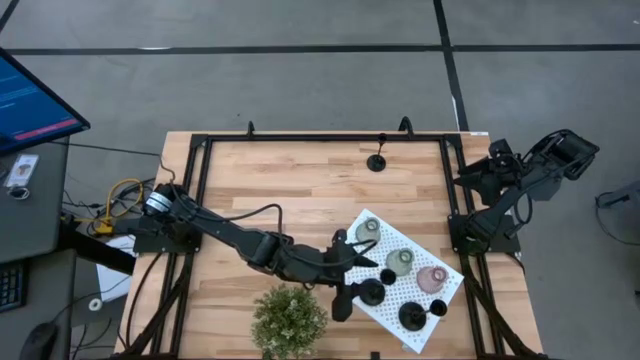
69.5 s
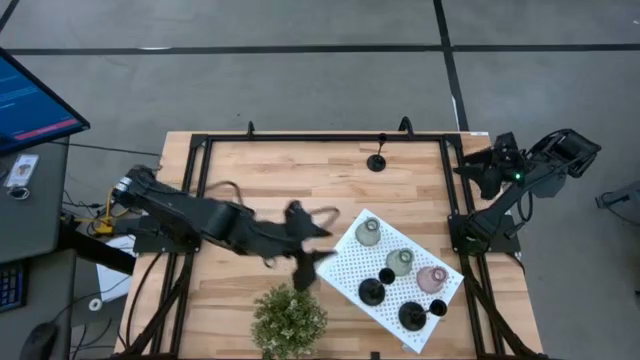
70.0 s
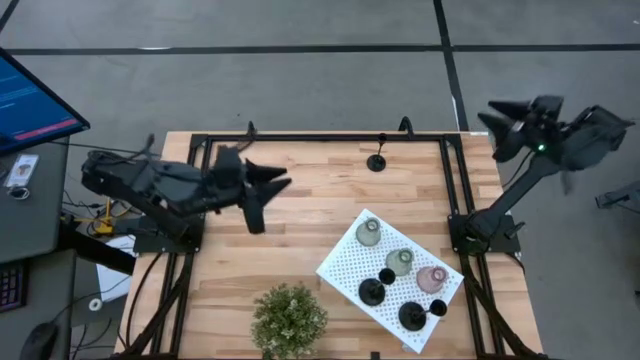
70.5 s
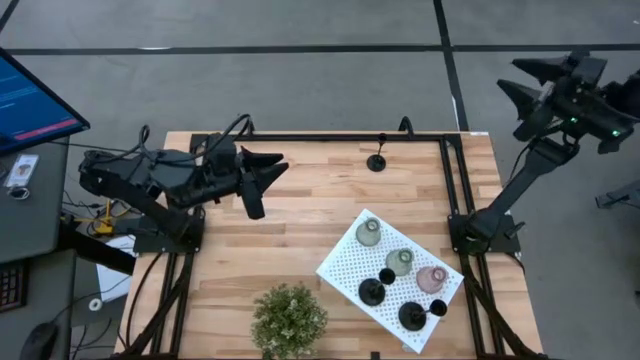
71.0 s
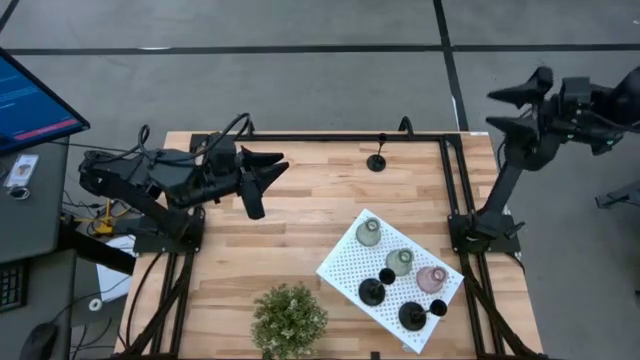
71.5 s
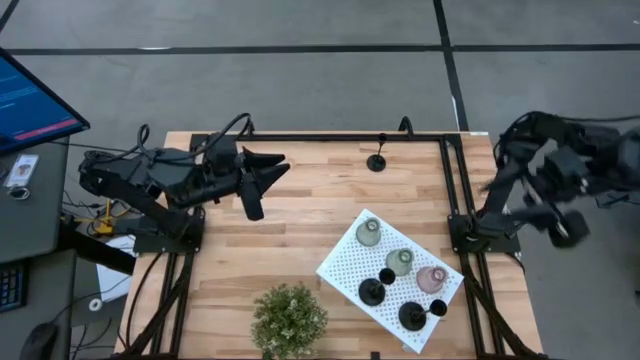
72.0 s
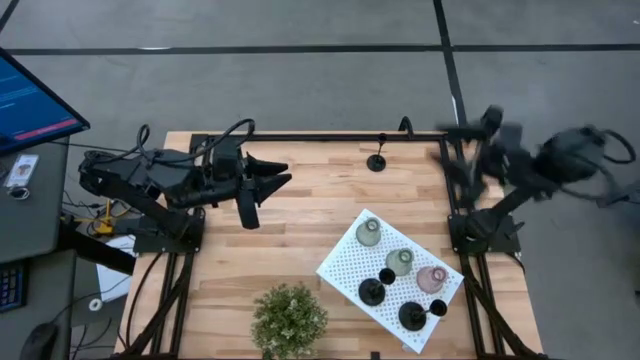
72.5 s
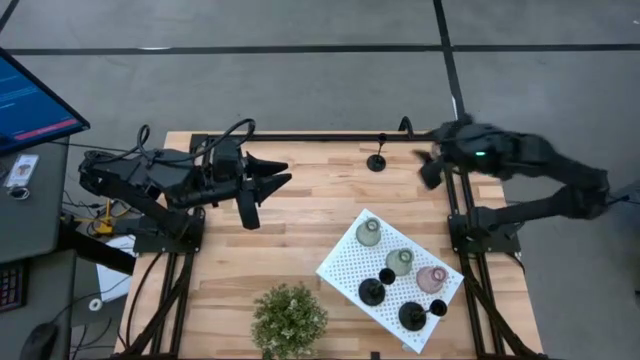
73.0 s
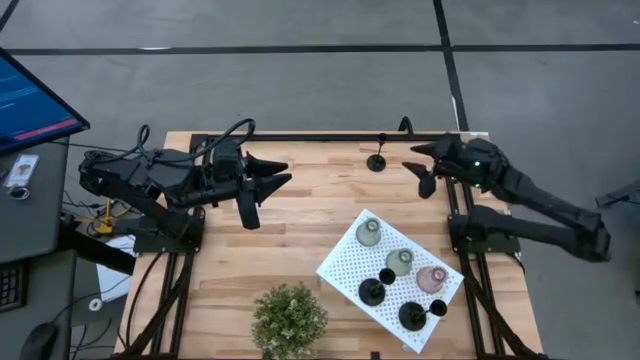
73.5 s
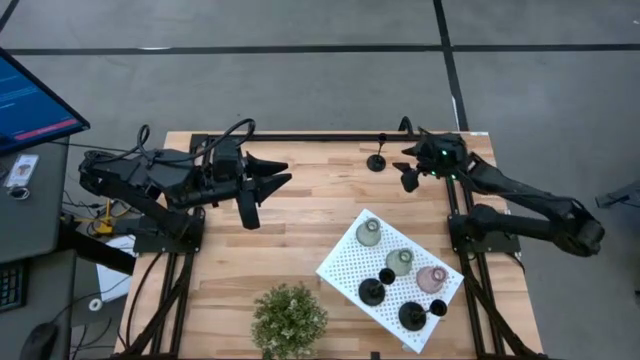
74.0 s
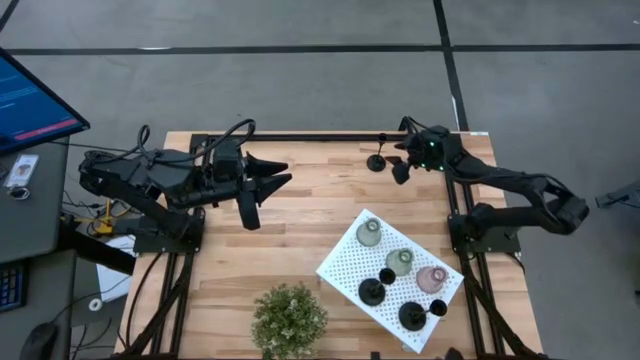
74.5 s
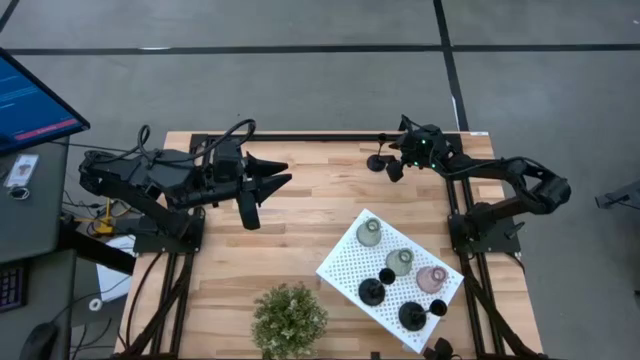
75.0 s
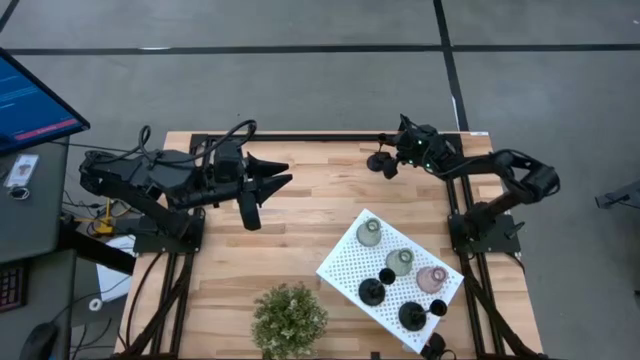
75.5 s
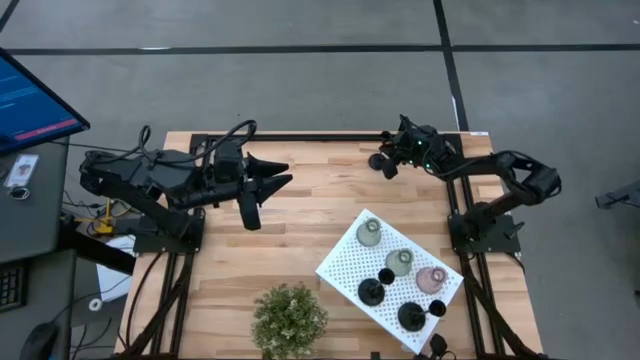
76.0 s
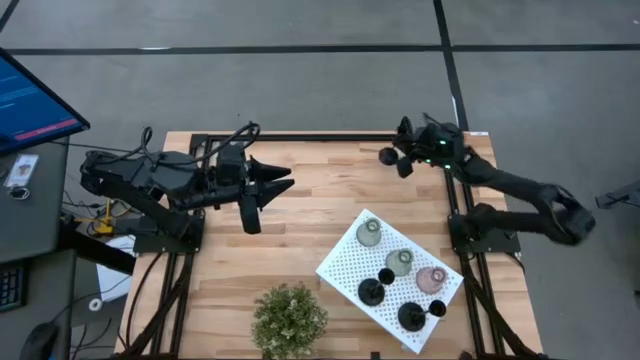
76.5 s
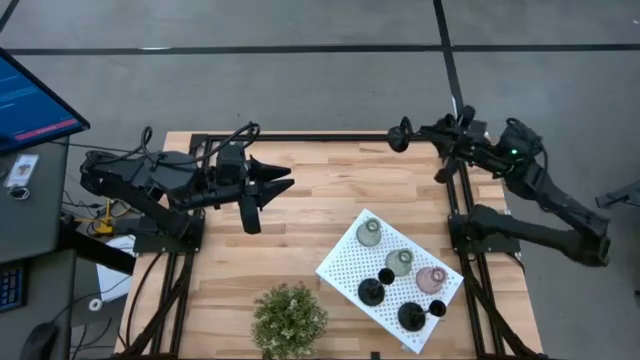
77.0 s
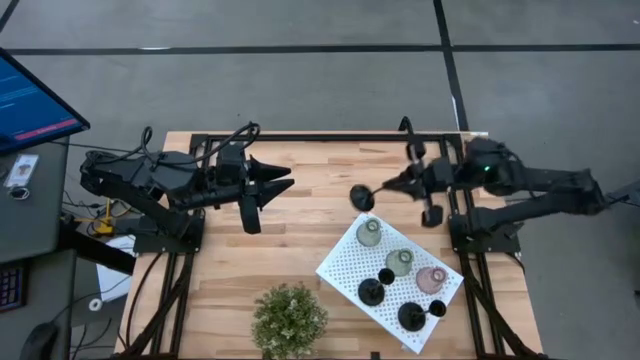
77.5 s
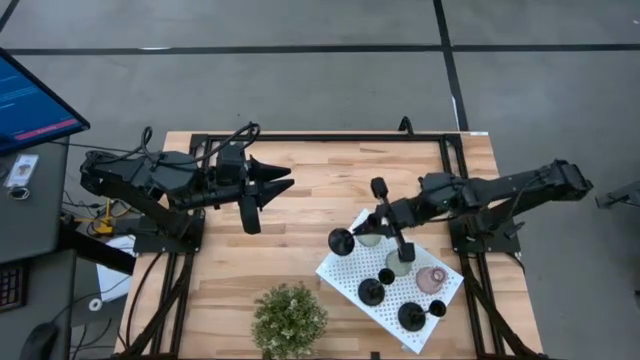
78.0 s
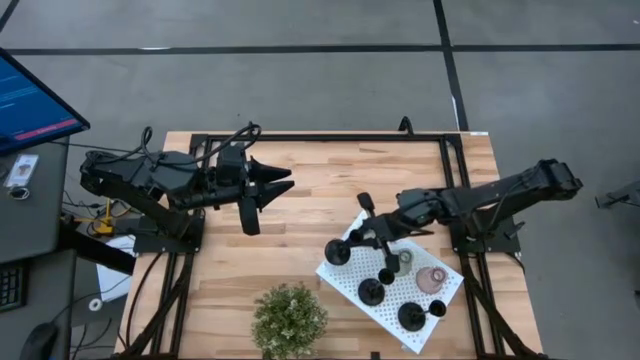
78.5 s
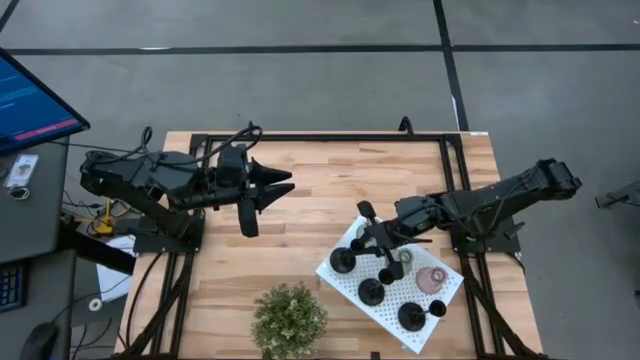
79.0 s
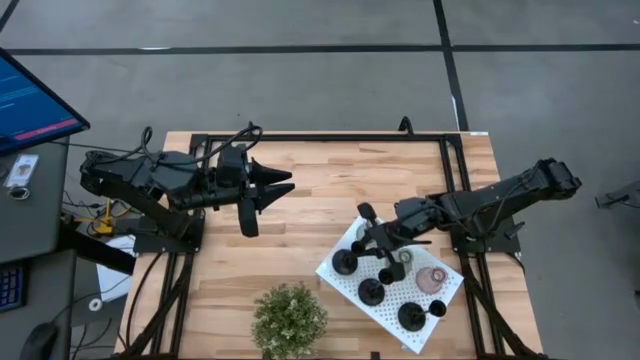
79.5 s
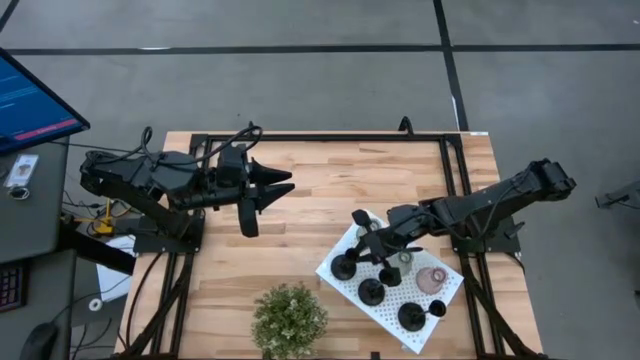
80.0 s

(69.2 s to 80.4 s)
Task: Pick & Place candle stick holders
Put the left black candle holder on the shelf aligned with the black candle holders

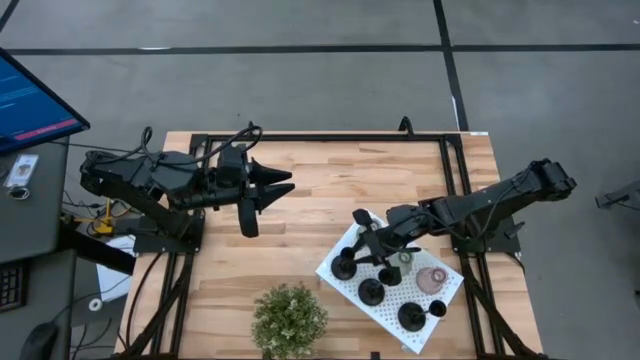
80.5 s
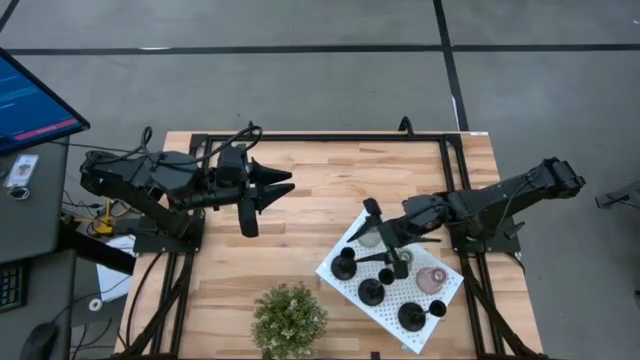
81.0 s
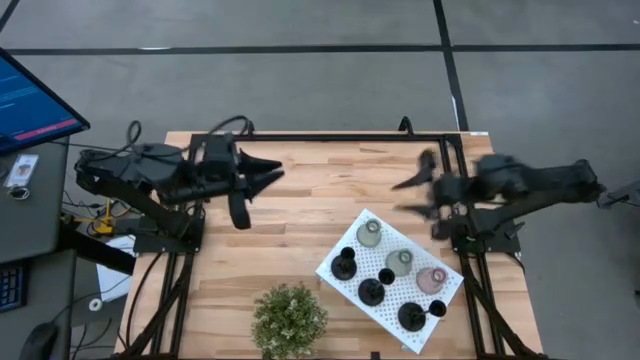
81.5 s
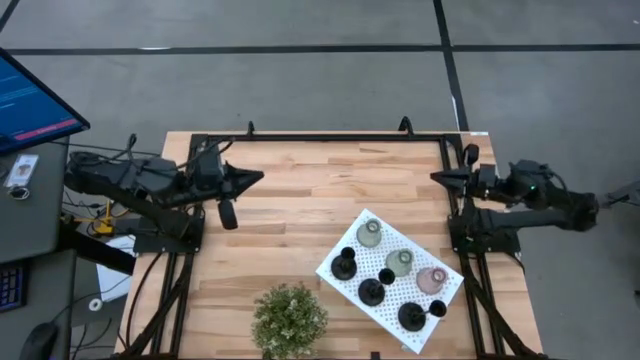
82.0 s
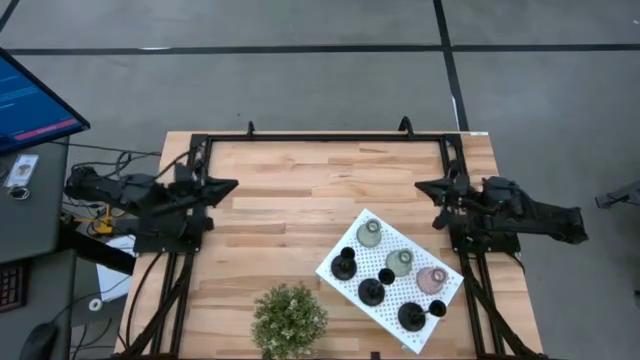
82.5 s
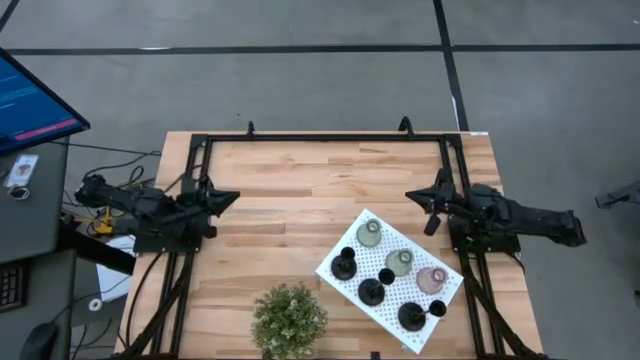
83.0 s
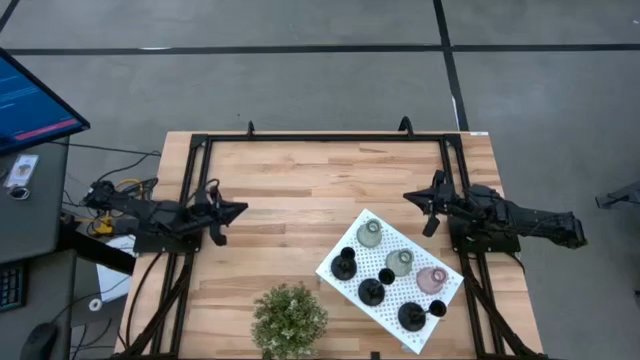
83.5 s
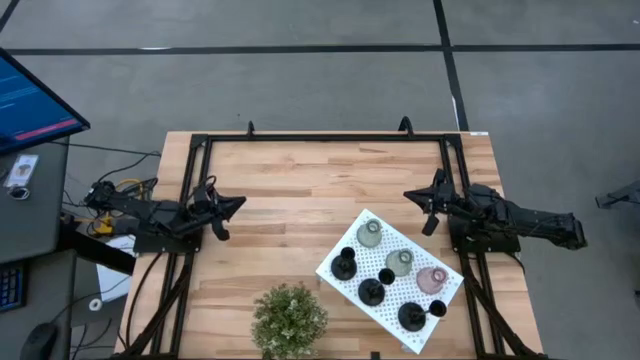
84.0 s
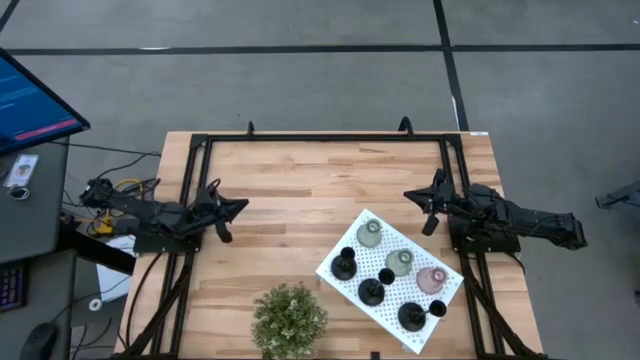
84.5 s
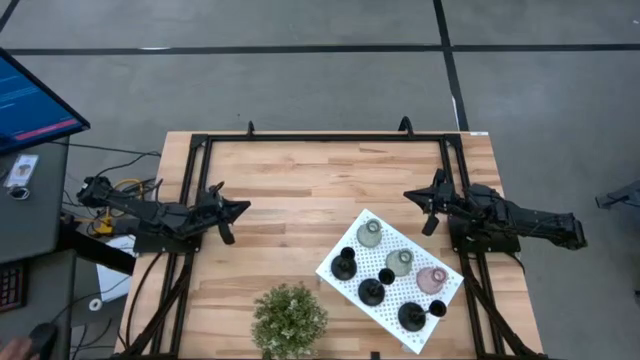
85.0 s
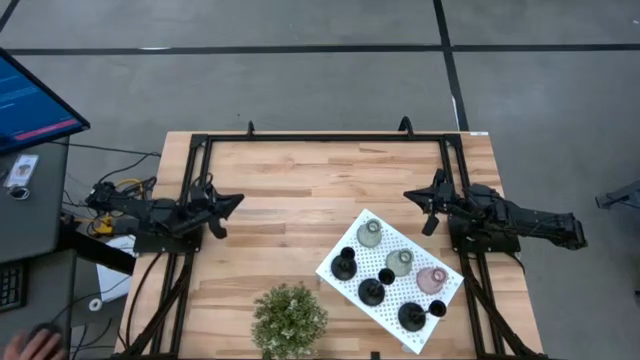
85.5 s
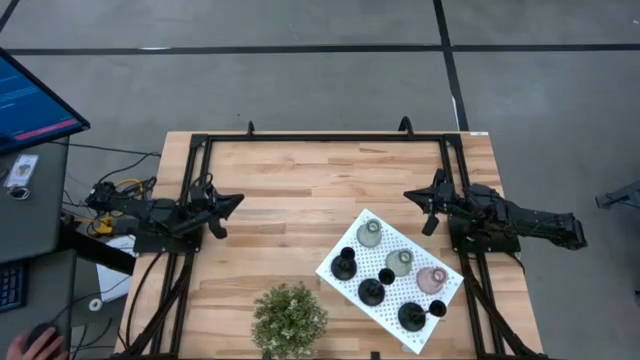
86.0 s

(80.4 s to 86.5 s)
Return to Home Position
